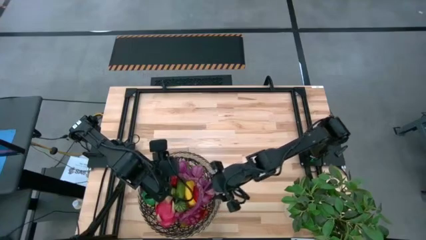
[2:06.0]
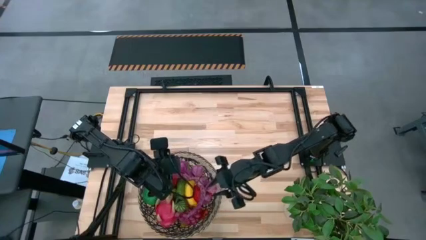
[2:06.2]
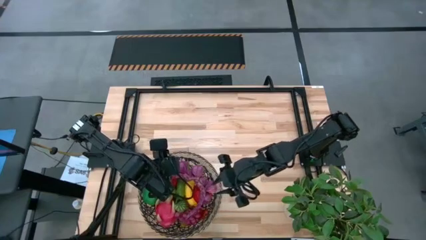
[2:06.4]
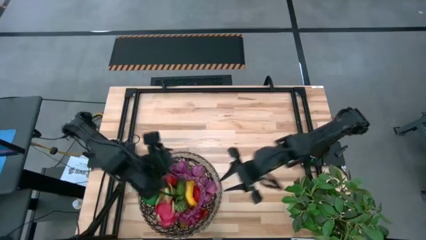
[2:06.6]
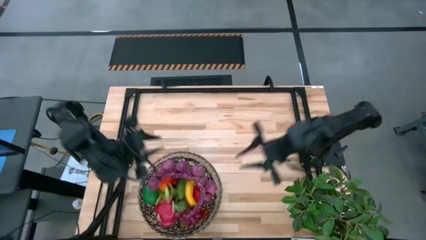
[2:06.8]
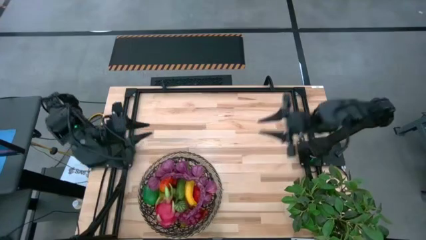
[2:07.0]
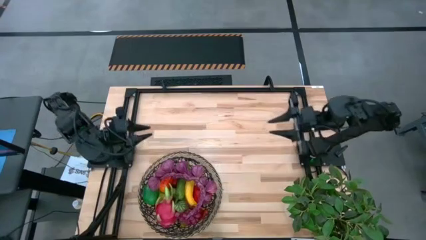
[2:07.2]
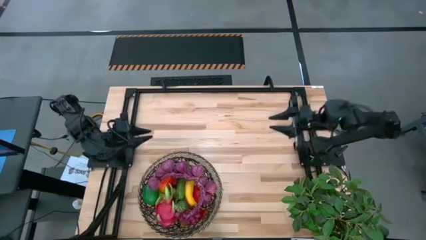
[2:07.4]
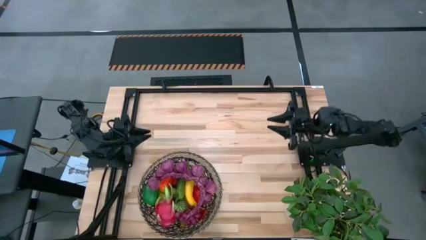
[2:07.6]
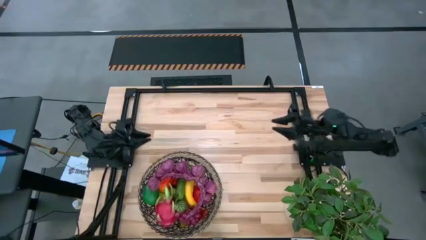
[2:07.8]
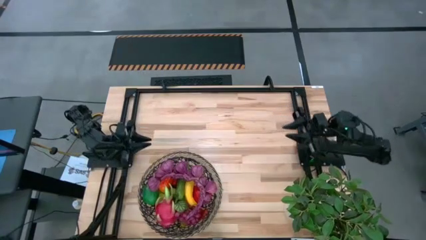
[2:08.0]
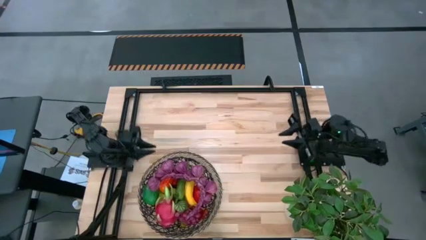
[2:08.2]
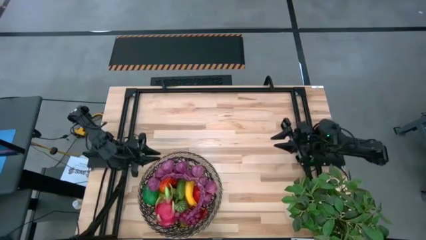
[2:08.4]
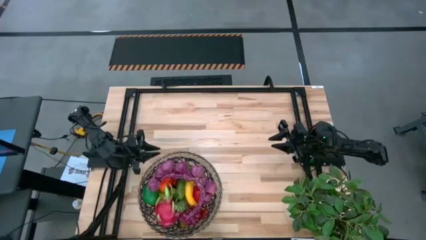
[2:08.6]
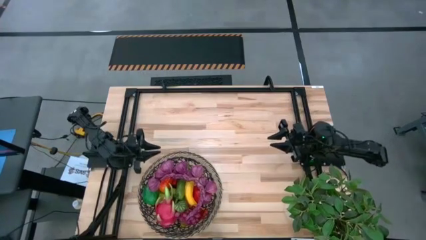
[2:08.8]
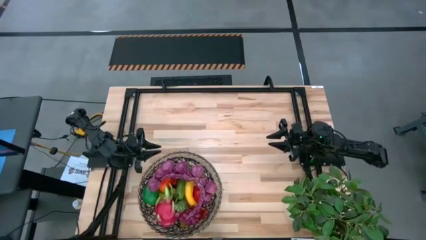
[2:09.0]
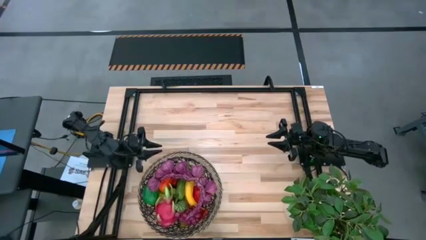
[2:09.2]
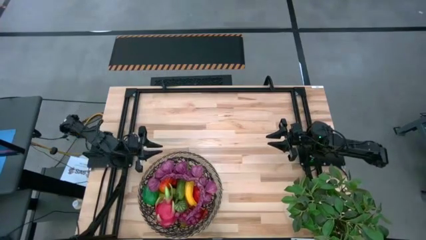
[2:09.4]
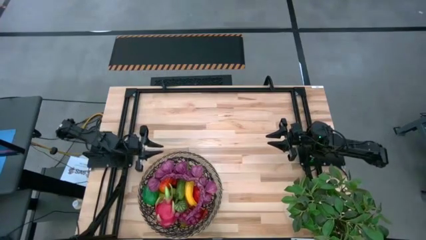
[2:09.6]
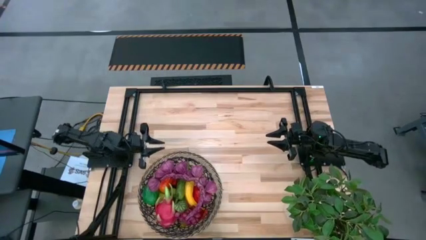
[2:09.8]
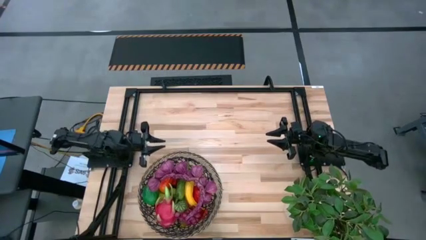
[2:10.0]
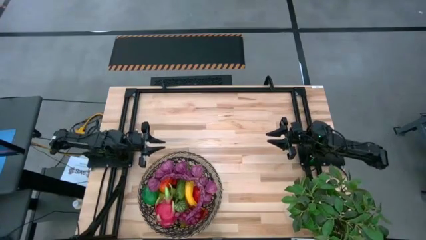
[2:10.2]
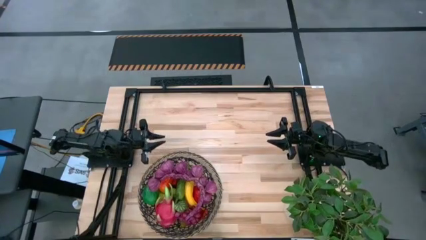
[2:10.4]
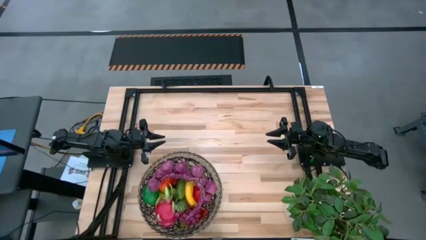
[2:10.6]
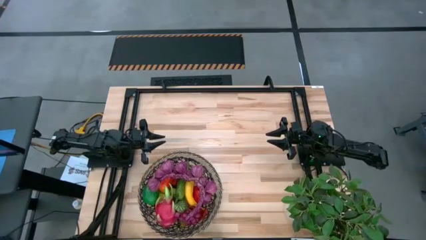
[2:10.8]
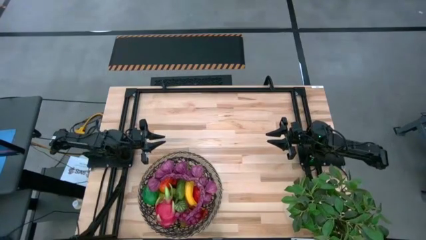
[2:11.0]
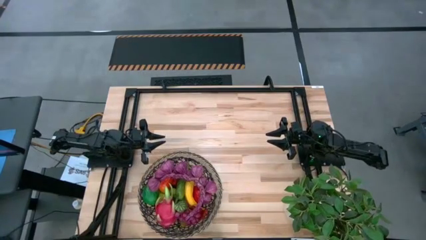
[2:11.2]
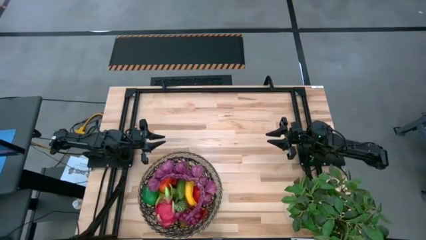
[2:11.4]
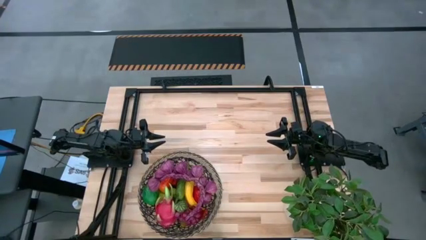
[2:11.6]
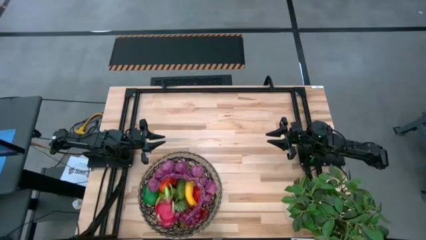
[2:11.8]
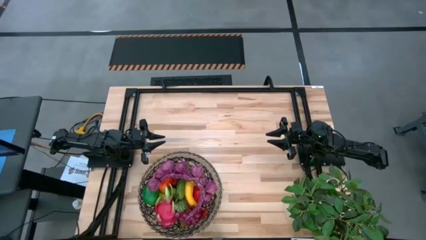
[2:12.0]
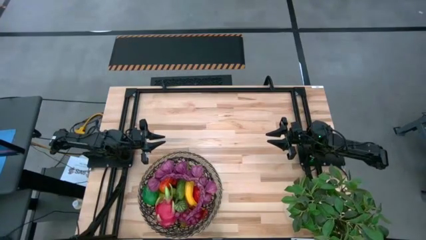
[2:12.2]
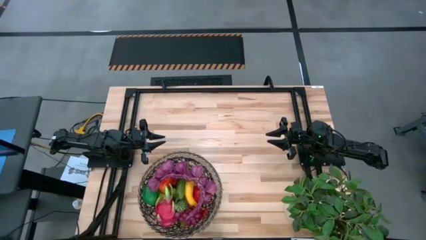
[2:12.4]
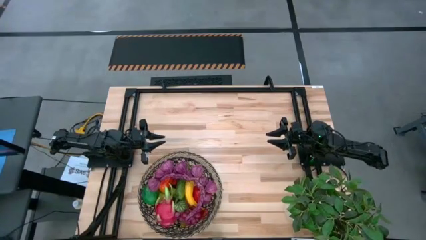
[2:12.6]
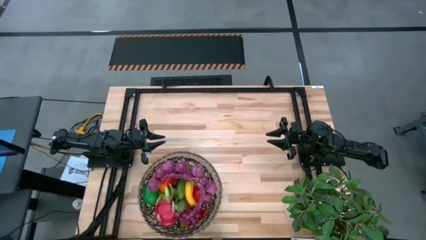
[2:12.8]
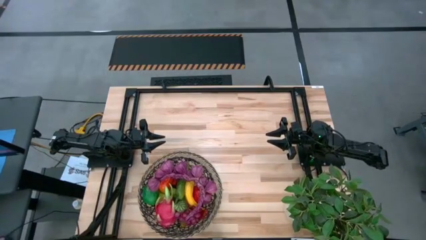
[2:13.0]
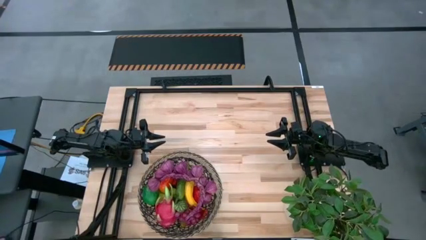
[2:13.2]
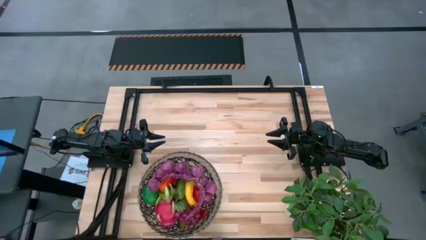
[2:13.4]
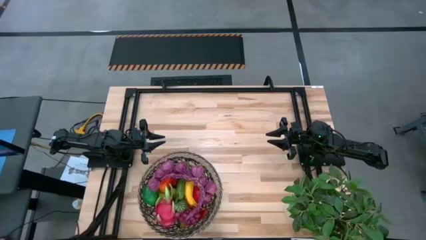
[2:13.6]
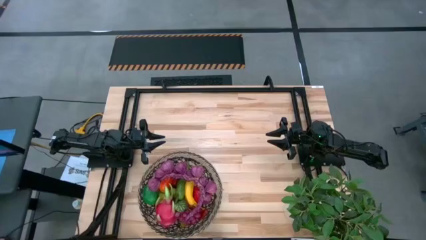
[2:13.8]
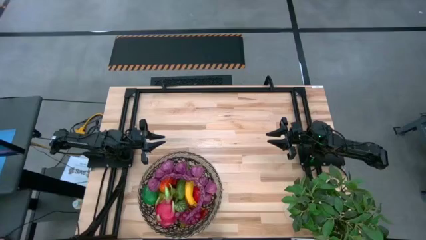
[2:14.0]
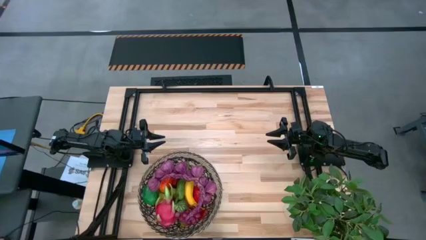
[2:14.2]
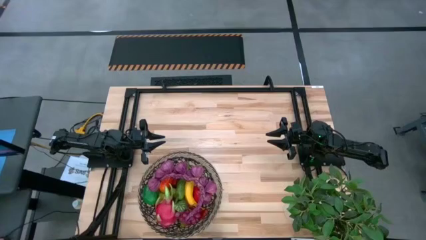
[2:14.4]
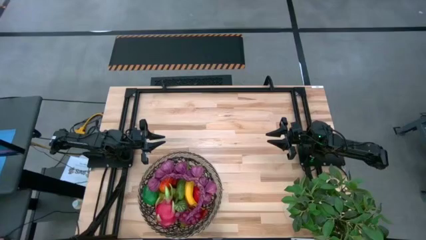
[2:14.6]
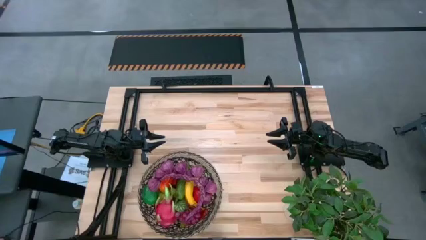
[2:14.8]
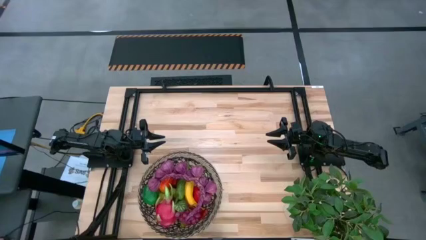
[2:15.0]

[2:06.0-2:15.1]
Task: Build produce basket
Return to Home Position
